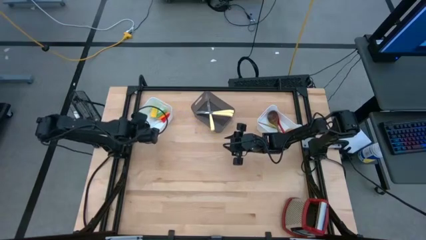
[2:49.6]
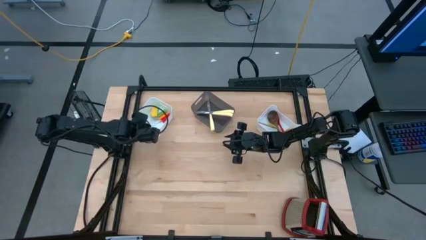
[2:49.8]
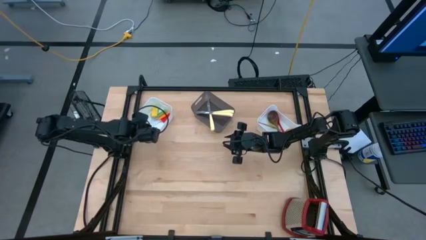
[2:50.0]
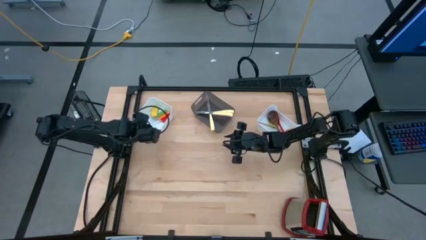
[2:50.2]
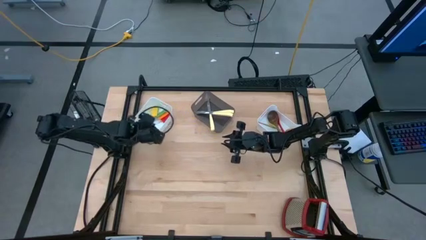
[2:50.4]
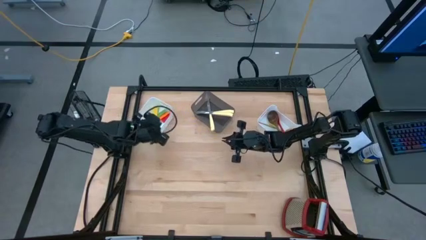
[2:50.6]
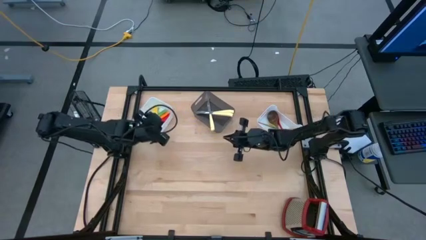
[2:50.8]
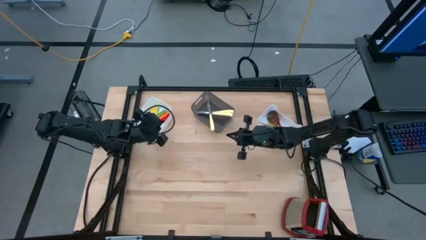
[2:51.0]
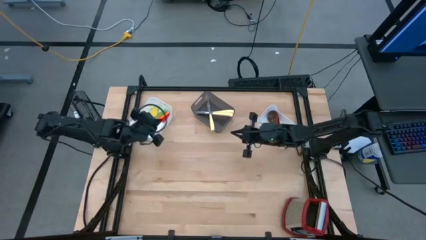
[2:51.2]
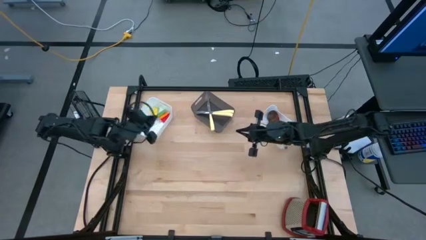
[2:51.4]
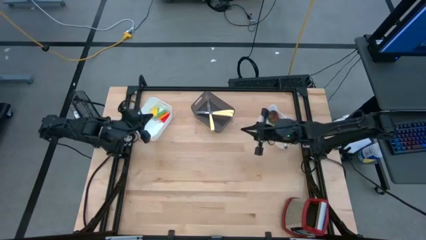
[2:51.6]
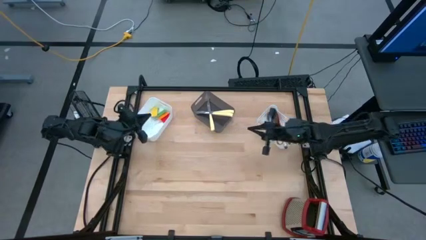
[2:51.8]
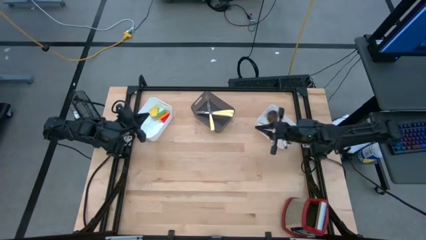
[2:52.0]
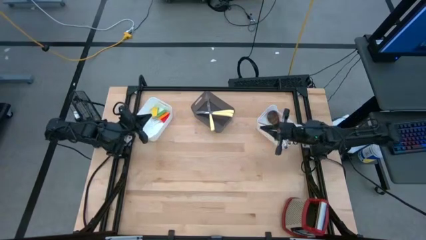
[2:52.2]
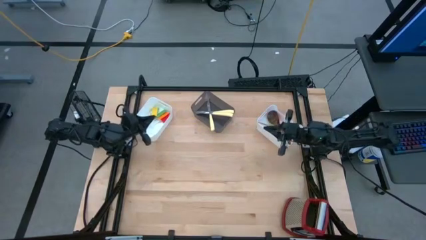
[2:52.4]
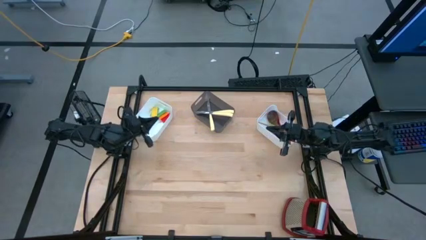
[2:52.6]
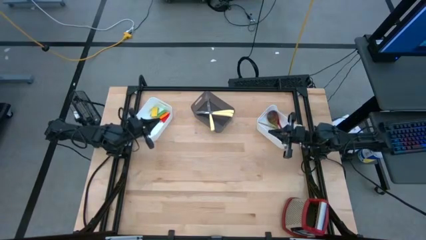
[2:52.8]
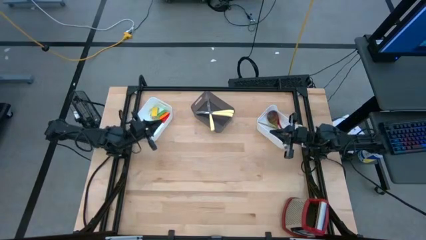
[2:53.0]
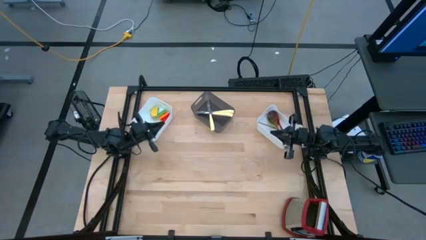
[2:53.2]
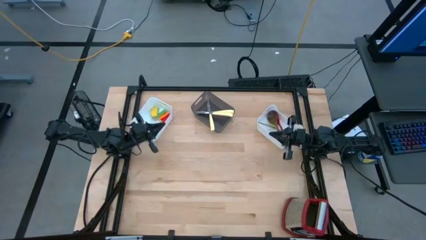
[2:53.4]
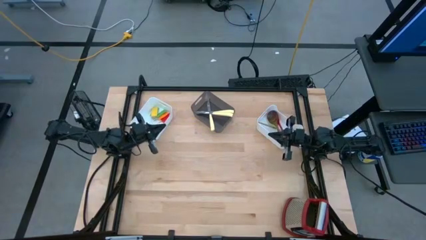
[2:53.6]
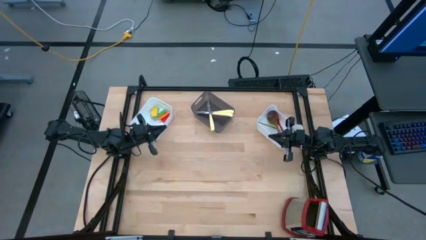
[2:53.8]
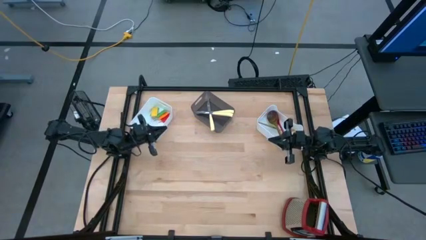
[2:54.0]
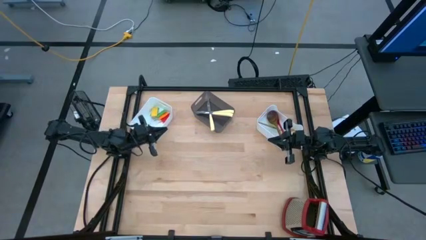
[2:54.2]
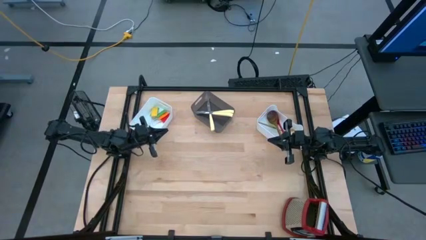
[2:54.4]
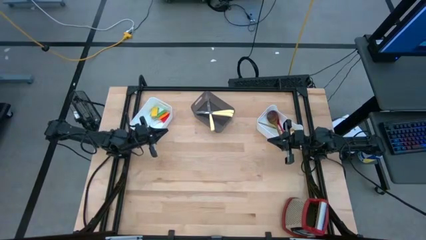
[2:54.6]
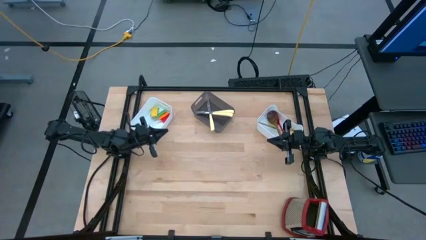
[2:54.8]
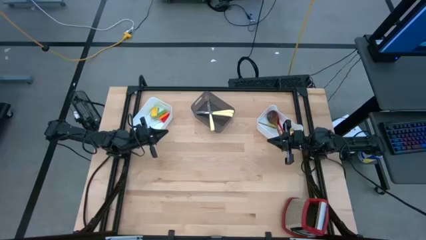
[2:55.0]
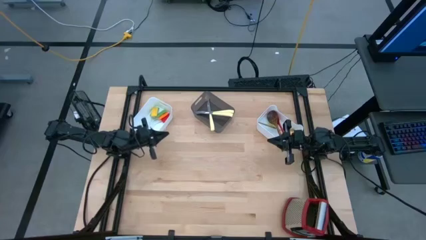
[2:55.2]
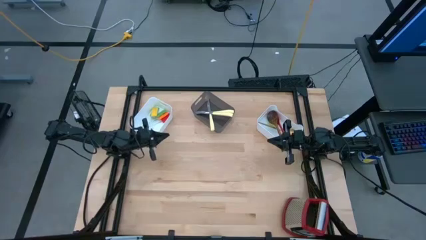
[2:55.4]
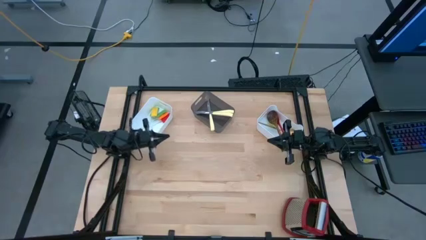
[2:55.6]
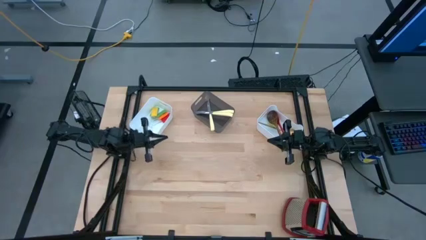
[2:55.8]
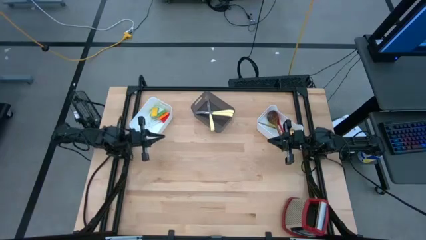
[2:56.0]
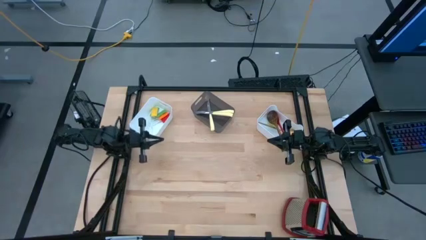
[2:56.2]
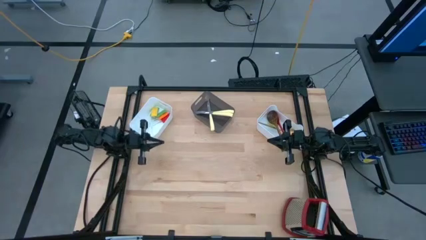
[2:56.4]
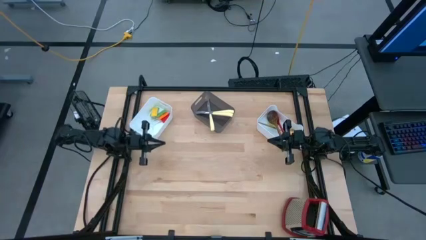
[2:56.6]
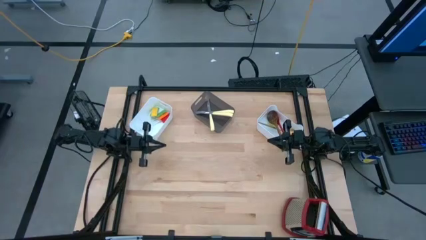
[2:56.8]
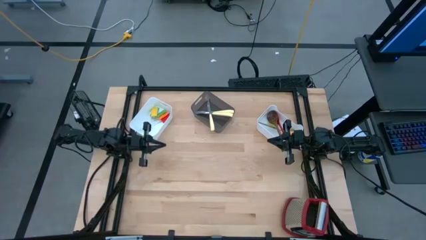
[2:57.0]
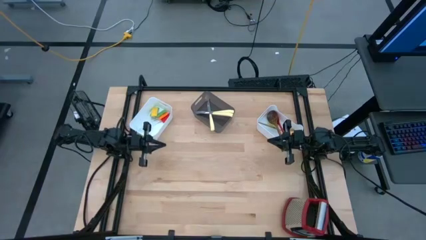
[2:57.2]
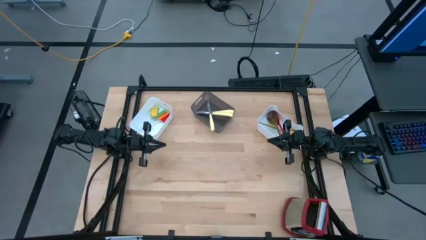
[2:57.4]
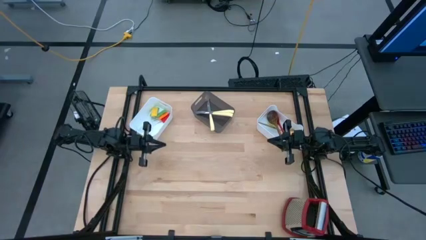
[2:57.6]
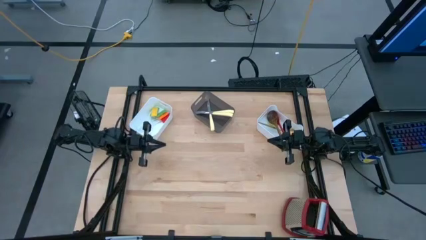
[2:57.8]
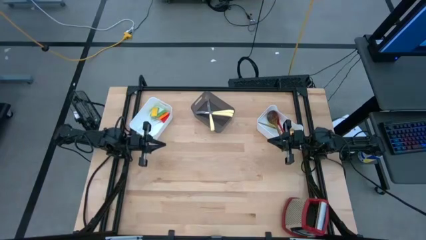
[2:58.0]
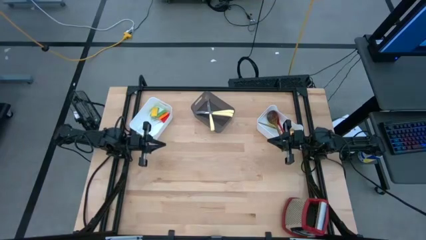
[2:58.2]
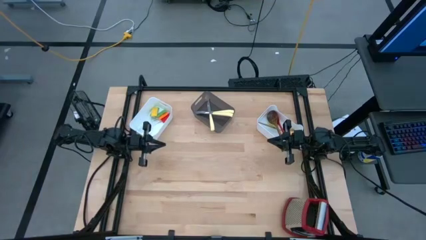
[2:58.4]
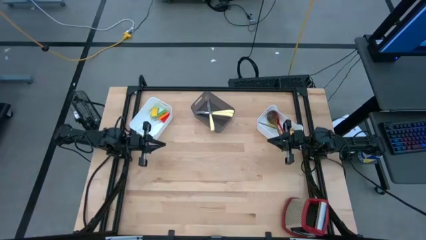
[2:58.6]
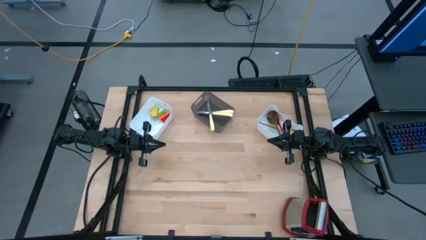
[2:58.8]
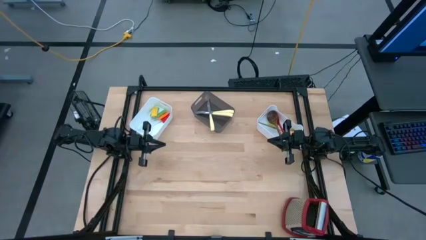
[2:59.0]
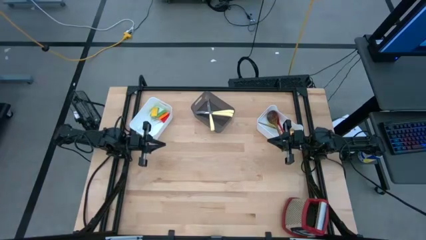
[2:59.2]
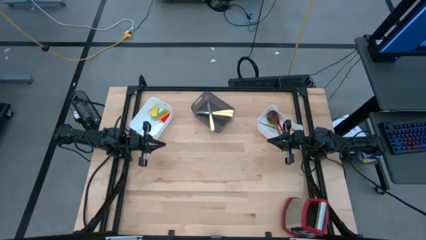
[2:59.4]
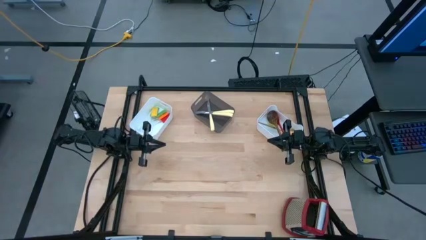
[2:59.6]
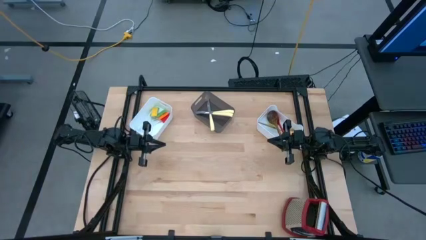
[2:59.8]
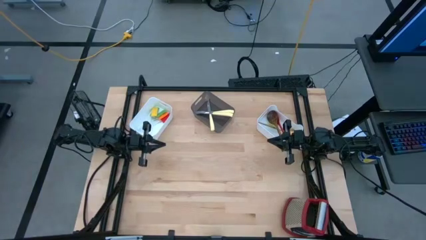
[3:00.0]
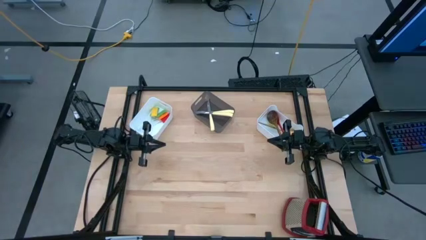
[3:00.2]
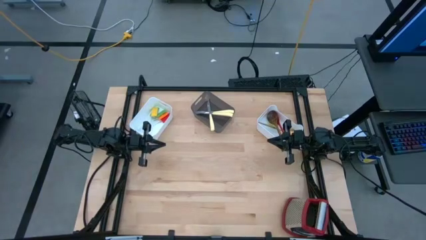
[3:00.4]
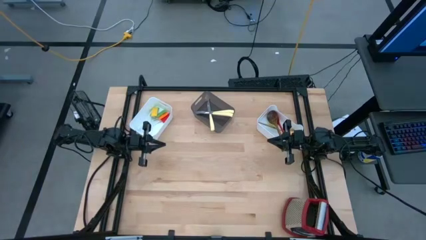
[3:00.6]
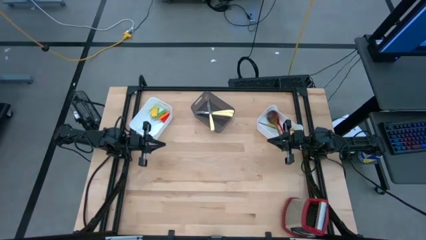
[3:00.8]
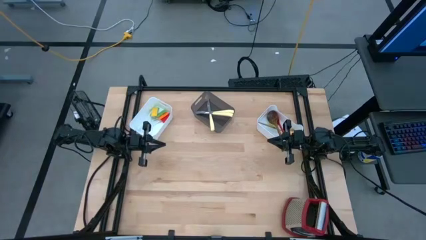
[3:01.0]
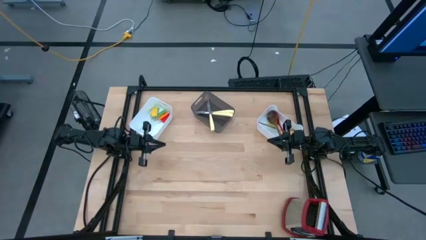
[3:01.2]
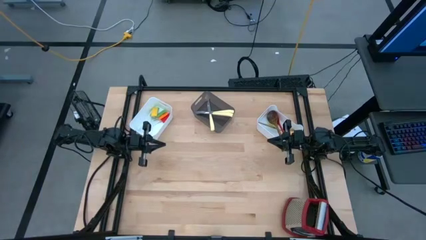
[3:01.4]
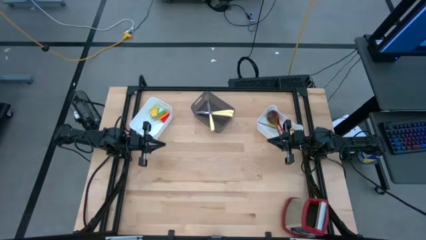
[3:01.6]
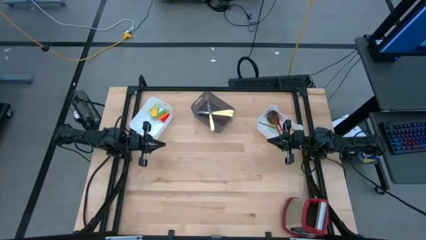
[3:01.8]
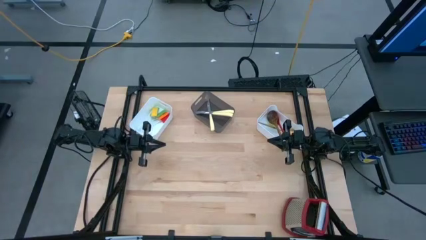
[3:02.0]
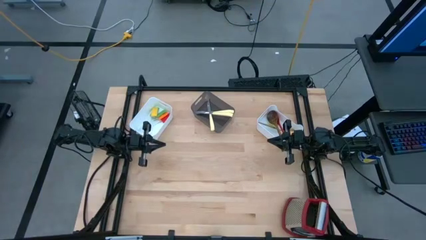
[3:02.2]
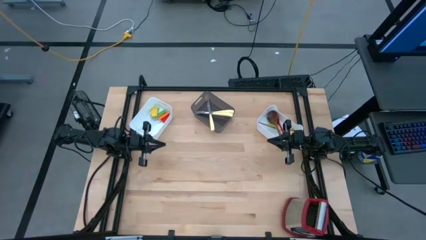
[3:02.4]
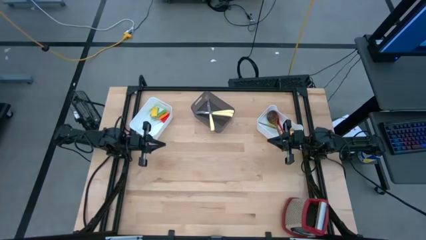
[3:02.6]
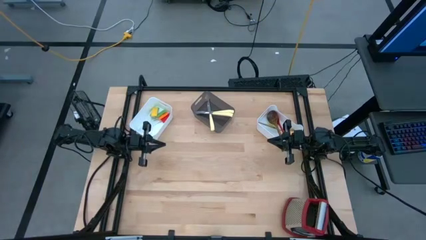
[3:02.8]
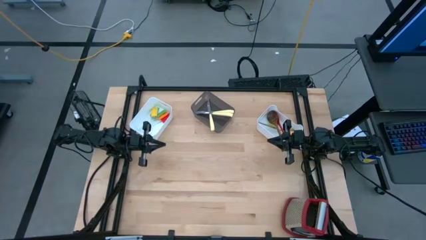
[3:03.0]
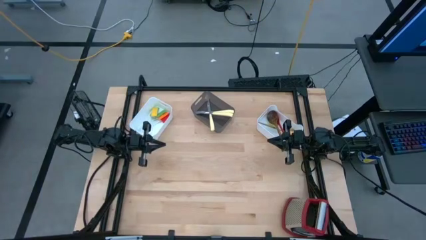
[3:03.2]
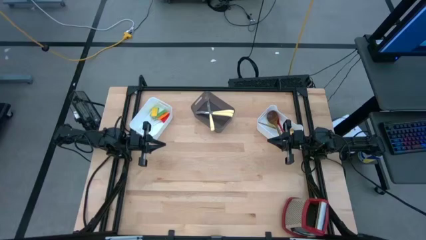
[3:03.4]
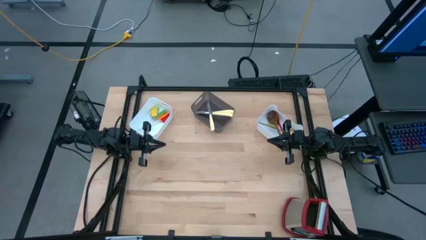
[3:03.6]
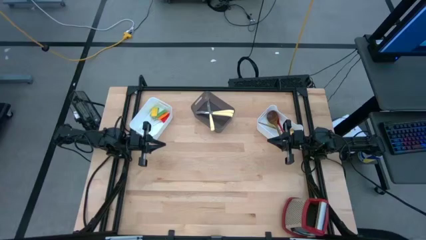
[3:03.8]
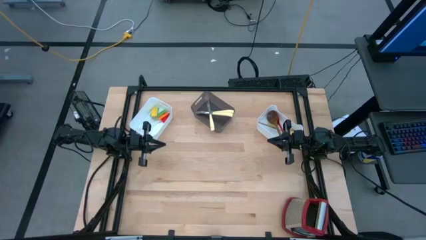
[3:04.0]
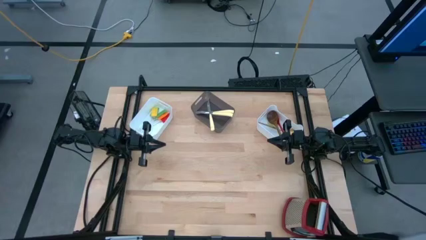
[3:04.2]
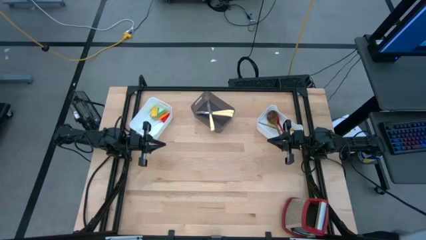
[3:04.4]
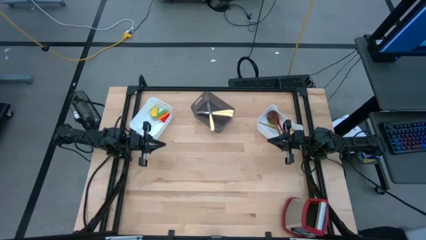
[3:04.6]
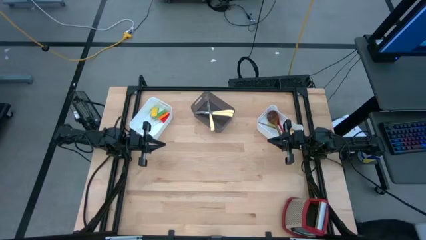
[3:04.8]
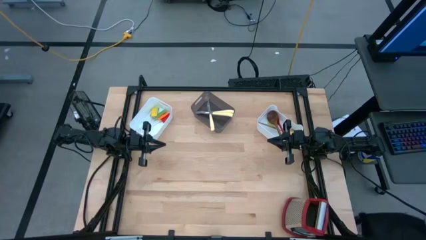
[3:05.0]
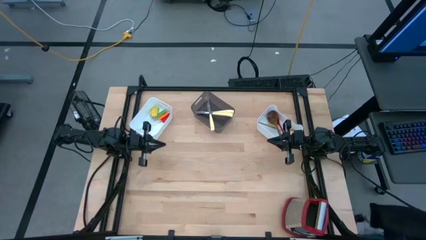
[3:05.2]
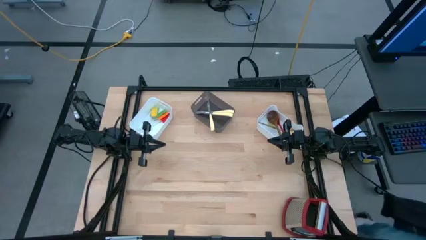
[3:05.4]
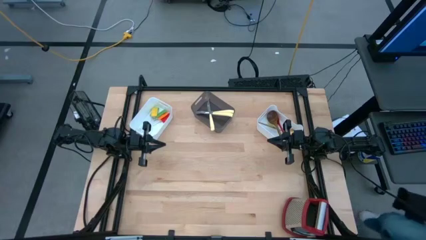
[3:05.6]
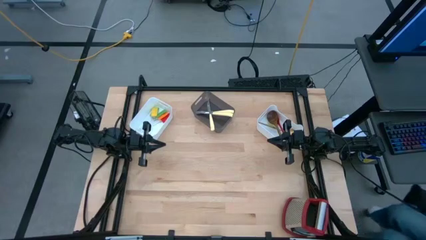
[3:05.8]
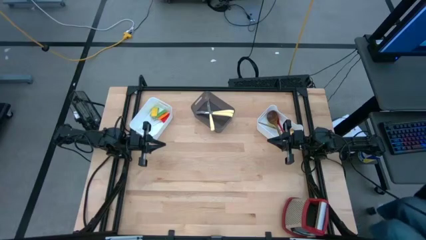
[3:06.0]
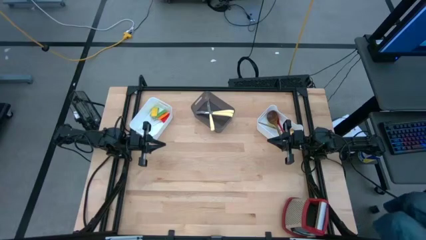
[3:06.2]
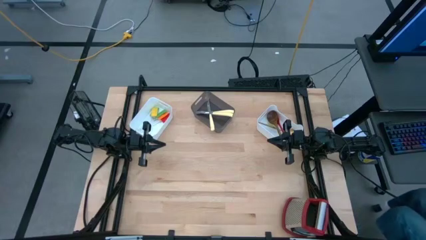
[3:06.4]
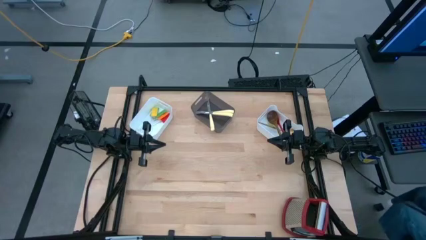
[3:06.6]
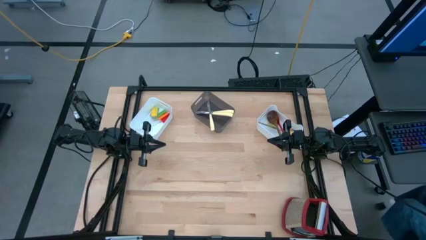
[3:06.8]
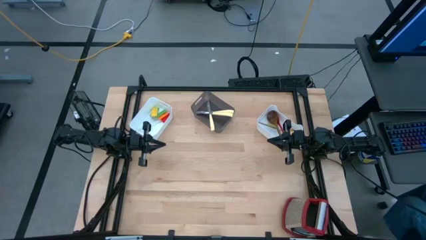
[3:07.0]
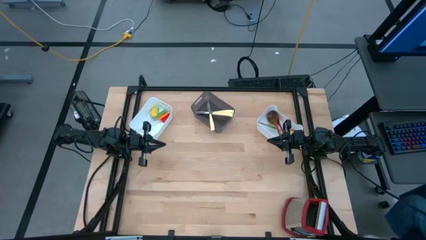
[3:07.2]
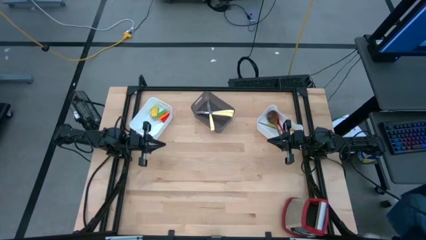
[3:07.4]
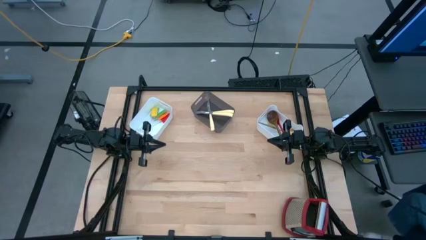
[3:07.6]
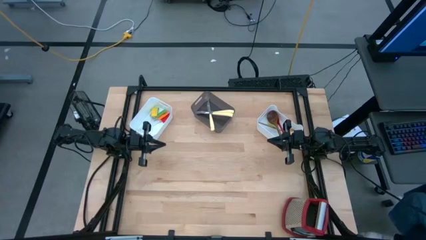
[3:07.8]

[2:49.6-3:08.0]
Task: Pick & Place Kitchen Items
Return to Home Position
